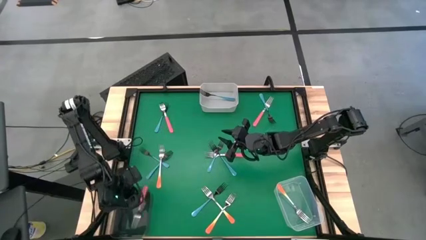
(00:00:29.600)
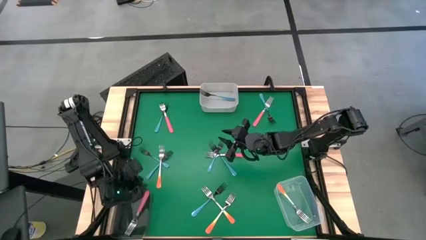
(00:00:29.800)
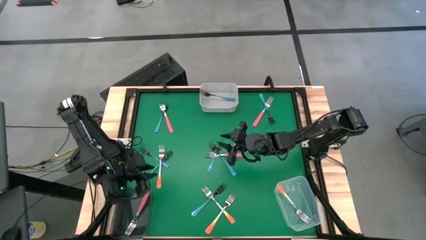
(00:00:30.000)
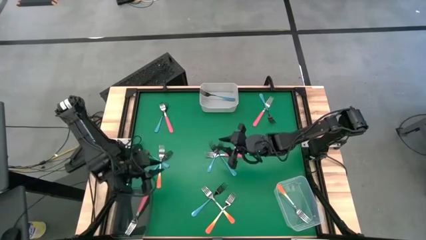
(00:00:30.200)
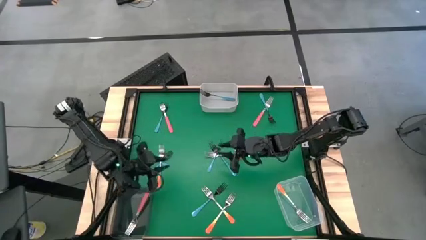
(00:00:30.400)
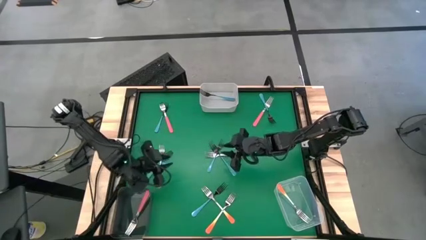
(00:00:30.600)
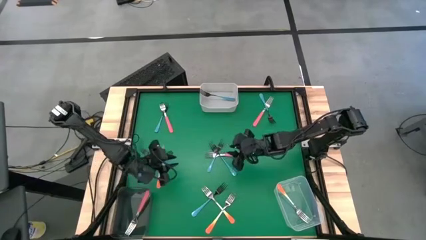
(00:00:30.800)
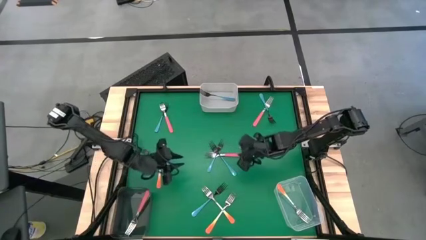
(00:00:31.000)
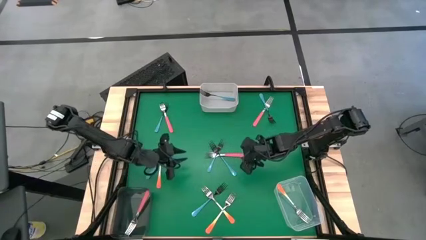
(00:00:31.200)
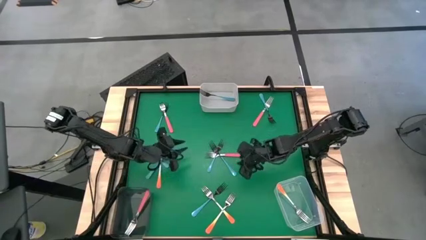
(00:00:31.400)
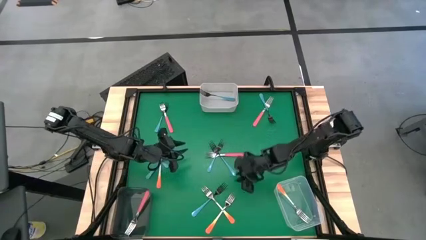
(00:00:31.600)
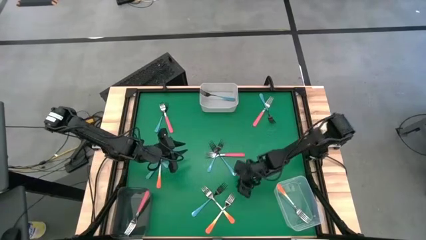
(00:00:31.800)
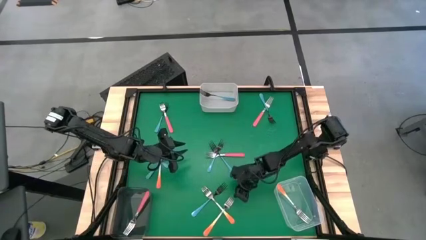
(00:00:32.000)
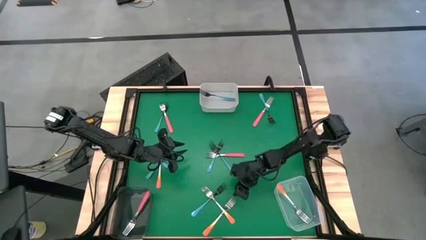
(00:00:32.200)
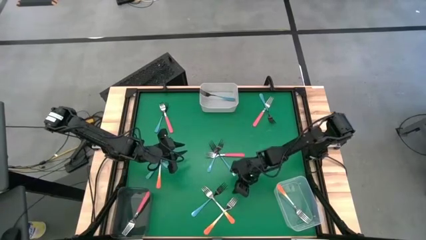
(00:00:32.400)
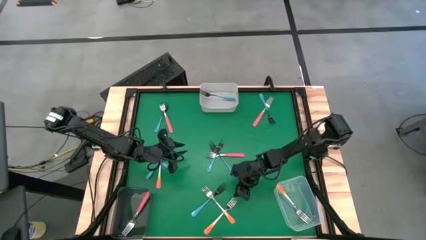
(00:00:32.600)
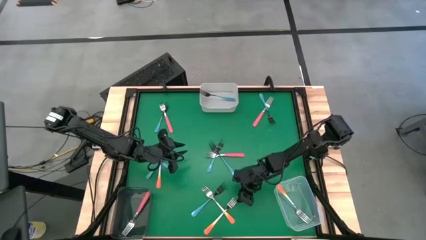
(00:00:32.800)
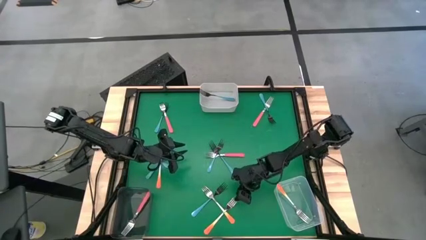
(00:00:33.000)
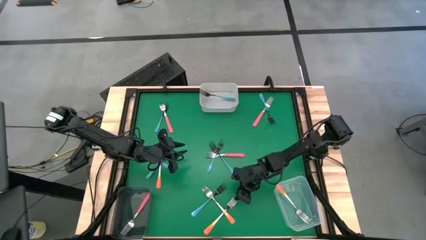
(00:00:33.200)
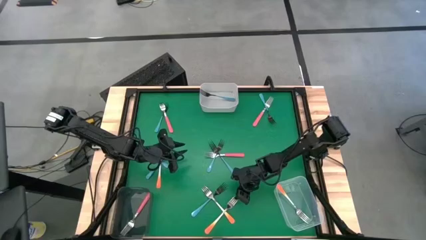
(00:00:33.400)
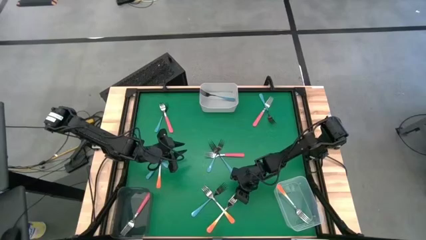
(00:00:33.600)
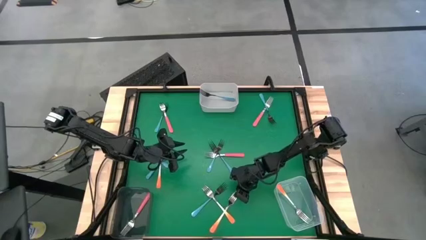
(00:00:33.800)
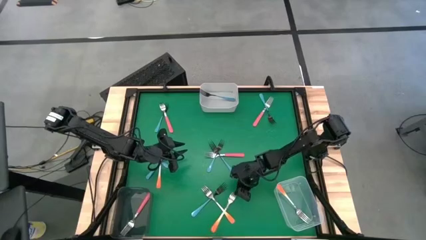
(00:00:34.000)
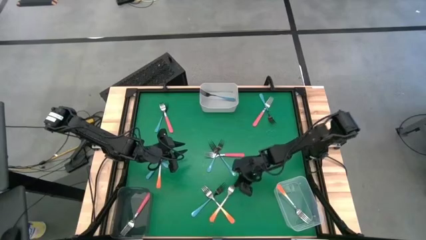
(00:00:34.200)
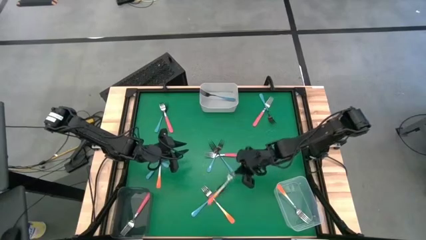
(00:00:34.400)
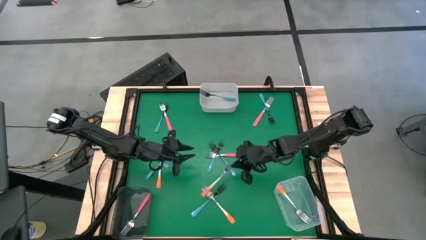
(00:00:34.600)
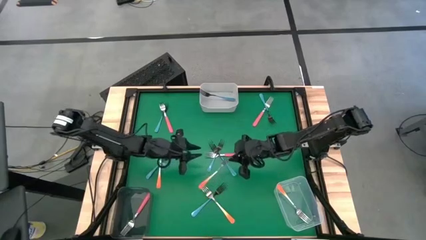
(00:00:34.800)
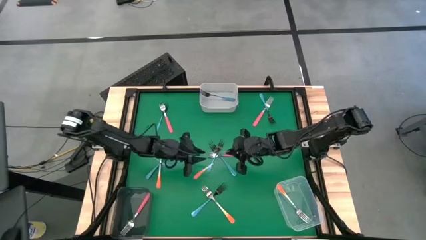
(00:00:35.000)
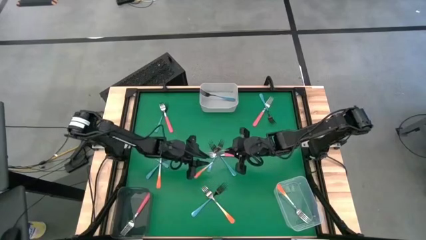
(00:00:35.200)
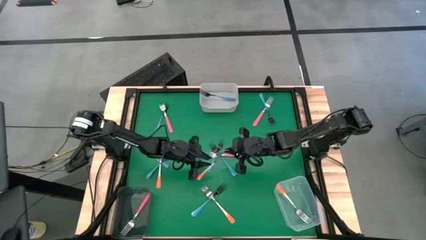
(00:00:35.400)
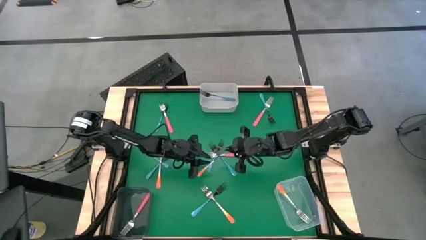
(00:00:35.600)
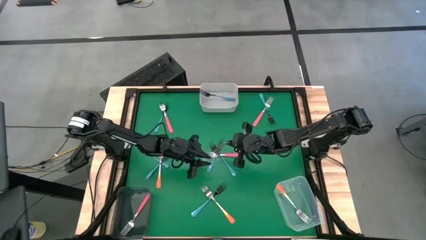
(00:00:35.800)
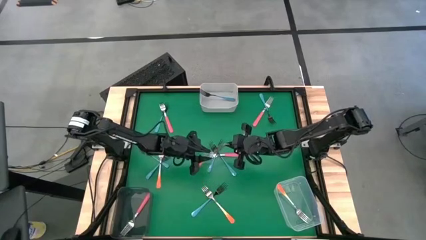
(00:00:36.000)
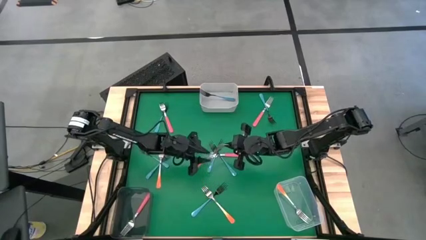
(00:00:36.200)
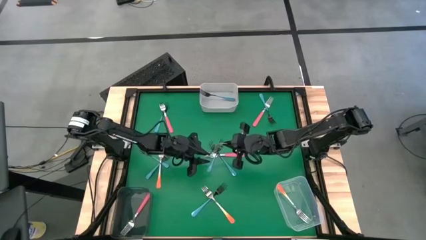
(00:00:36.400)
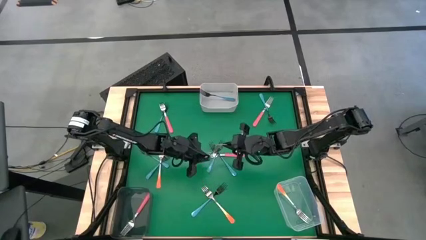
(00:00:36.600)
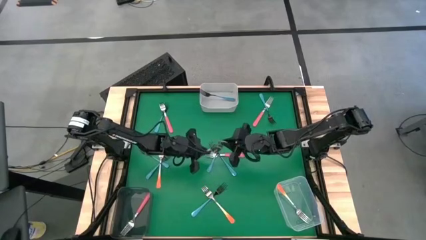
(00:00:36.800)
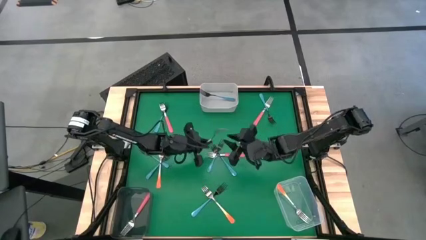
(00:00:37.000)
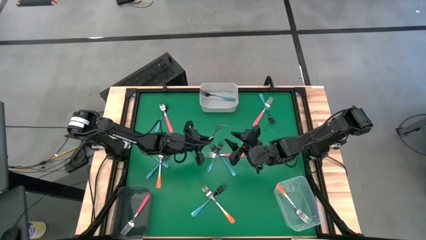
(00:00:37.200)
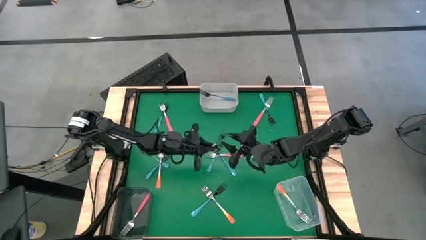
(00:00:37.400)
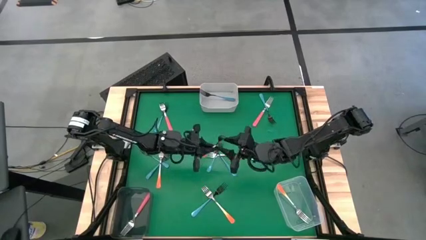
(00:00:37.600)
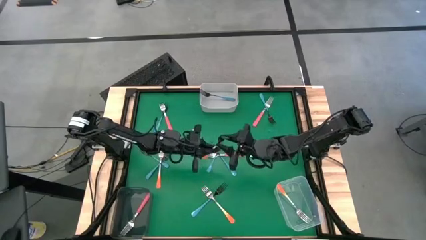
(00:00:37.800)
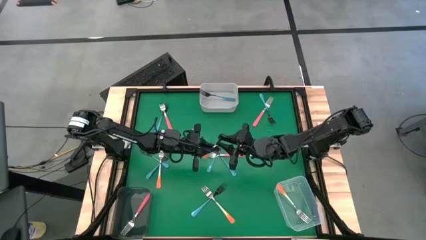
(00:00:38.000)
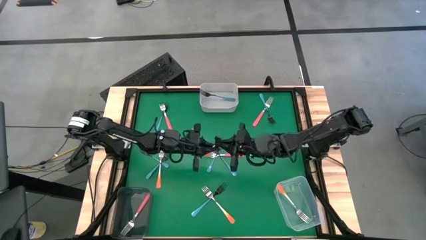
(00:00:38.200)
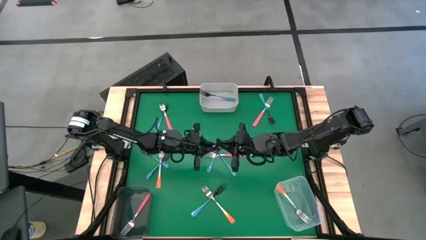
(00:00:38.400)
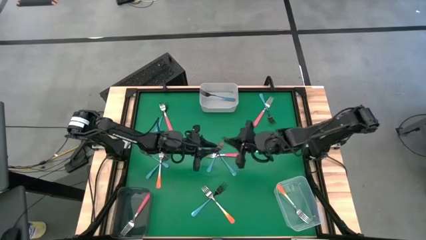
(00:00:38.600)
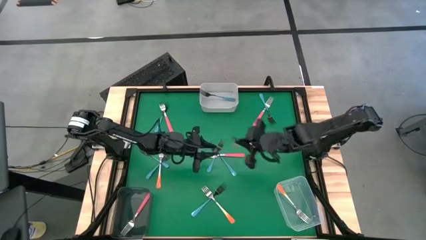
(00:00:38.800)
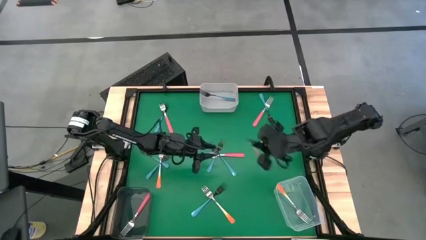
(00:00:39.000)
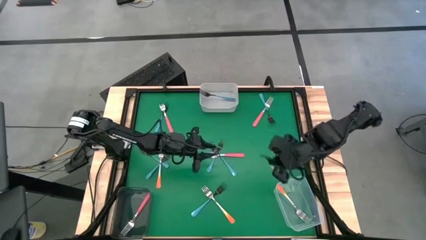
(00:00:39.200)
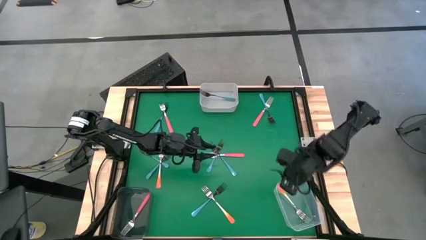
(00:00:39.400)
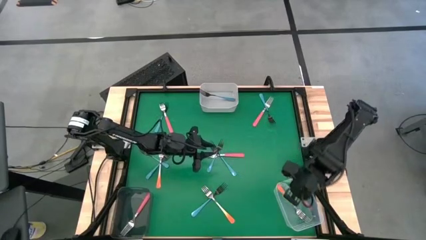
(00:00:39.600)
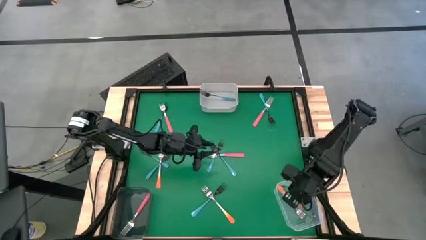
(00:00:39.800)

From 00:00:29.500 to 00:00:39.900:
Task: Sort silverware by color (type)
Put the bottom orange fork into the transparent bin

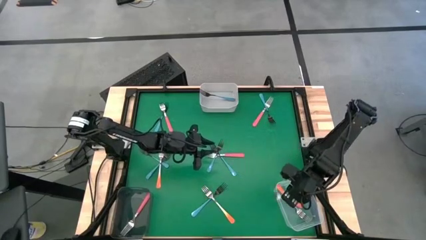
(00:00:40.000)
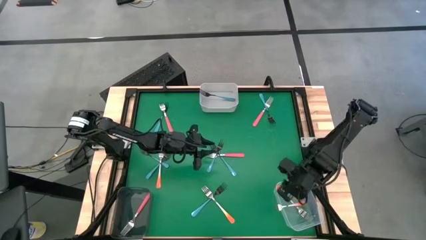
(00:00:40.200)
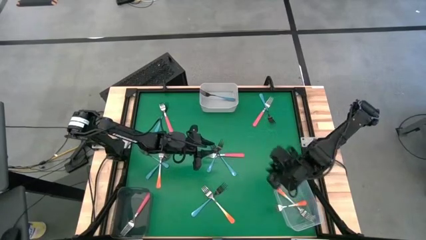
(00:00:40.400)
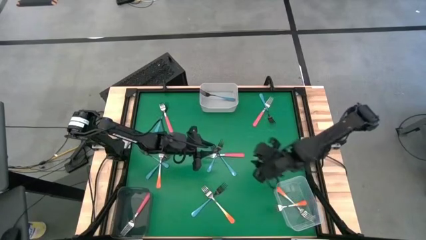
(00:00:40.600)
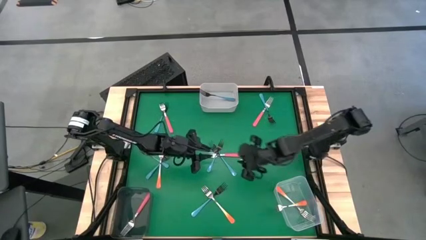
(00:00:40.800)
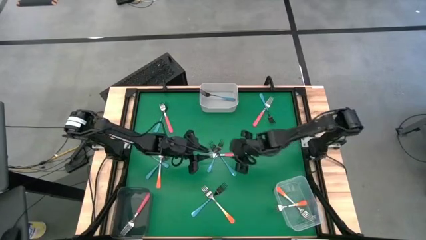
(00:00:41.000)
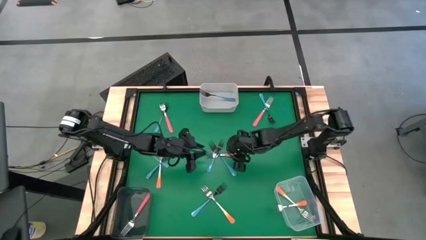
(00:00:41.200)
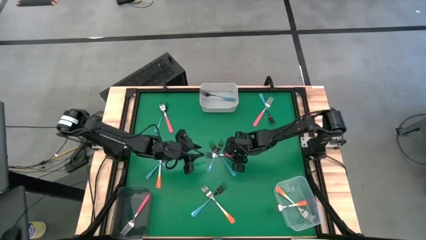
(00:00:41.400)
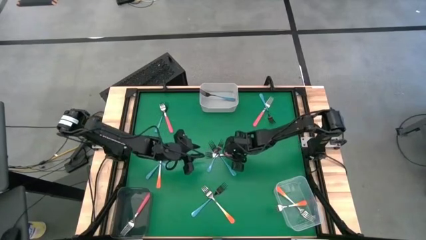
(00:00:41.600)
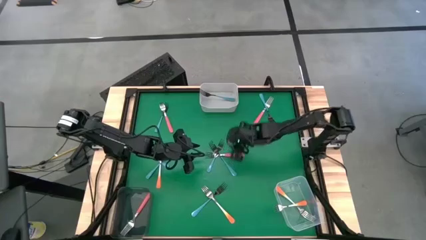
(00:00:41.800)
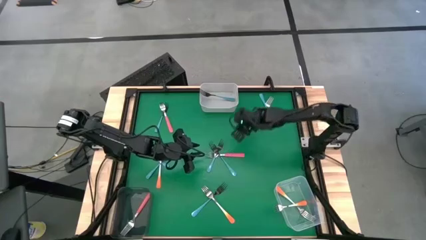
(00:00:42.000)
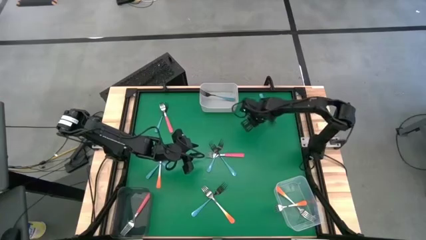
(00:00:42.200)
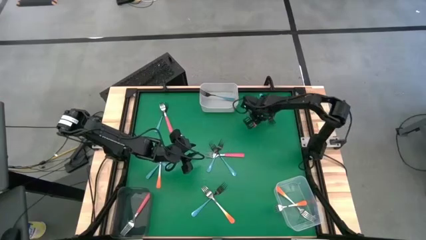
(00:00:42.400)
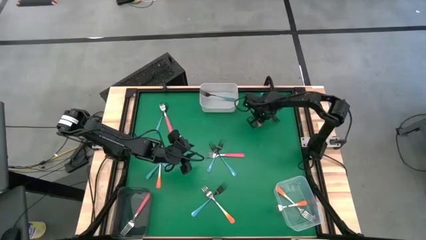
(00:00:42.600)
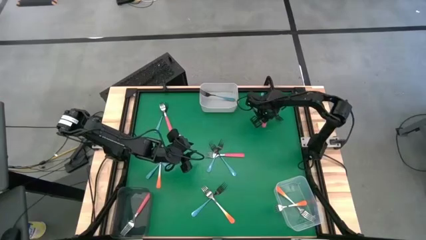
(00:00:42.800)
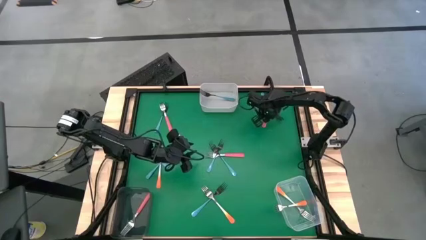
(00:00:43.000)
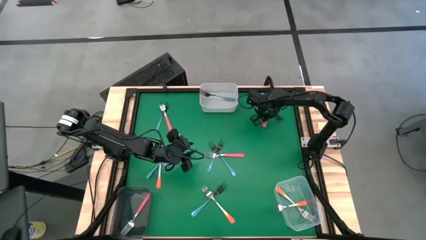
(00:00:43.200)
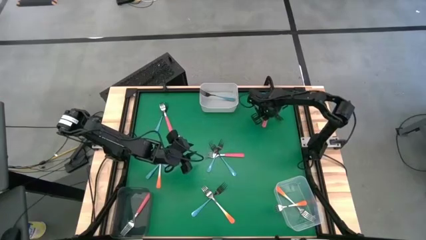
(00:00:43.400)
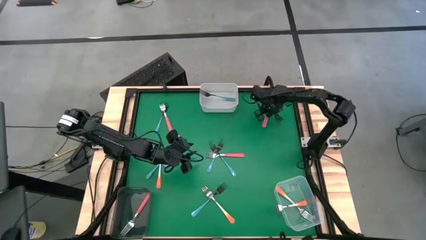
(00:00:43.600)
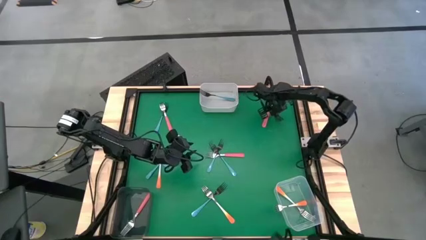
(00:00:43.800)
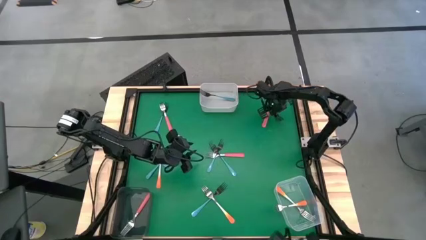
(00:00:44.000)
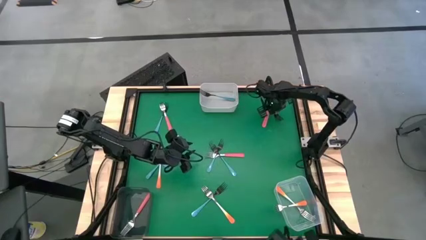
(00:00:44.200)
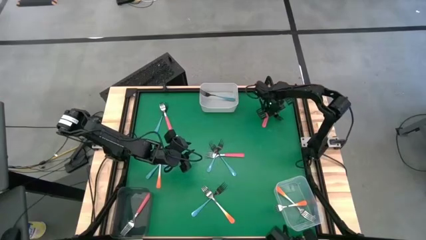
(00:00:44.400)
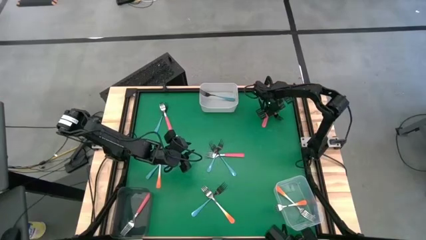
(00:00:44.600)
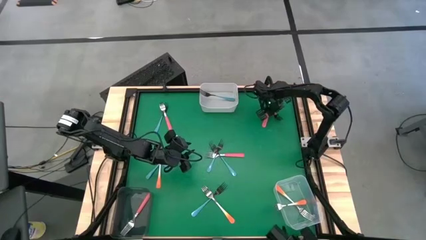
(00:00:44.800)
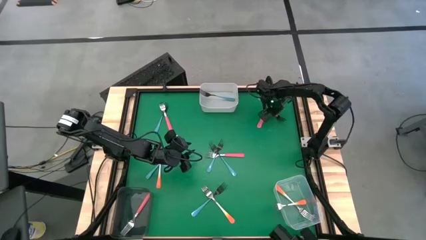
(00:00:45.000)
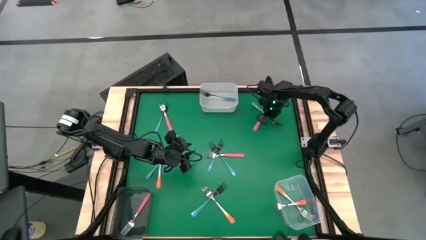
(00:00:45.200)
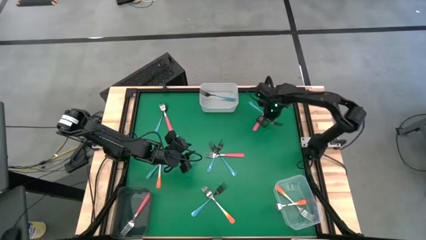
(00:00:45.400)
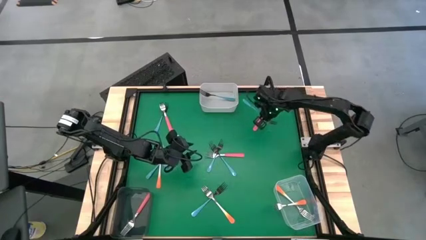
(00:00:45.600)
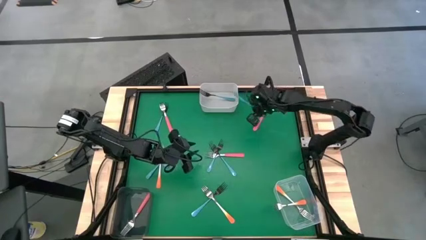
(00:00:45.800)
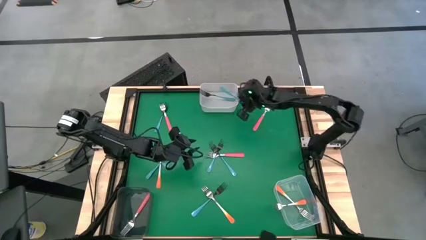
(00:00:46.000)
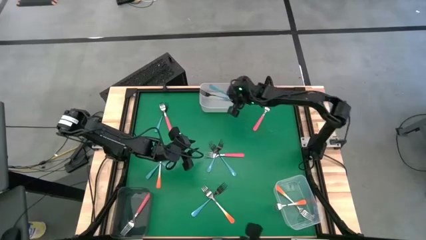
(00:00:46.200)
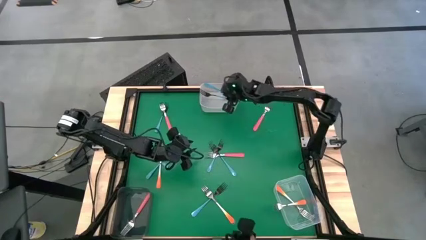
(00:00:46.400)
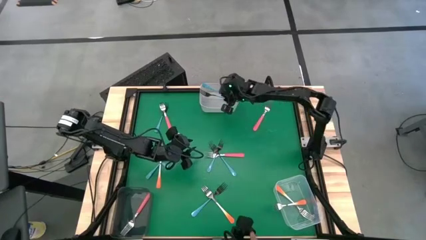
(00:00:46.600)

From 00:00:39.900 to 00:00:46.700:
Put the blue fork into the white bin

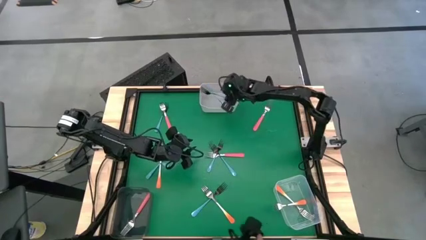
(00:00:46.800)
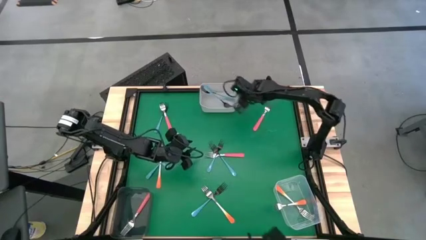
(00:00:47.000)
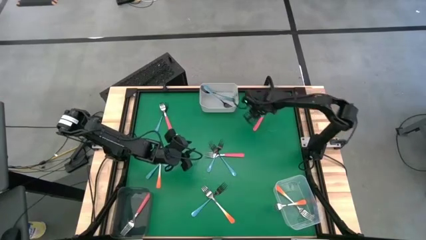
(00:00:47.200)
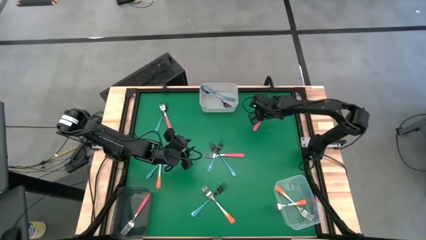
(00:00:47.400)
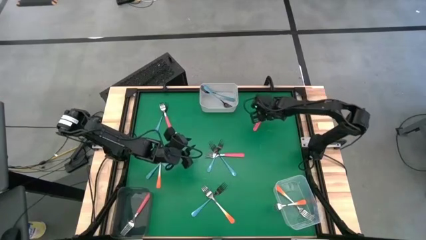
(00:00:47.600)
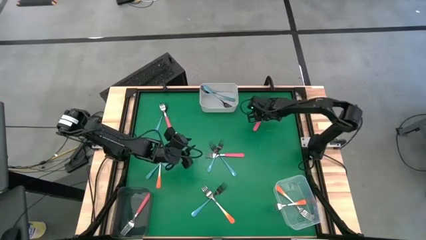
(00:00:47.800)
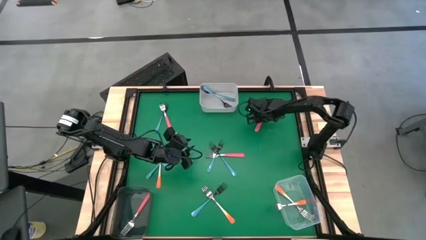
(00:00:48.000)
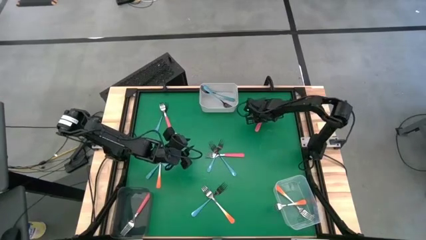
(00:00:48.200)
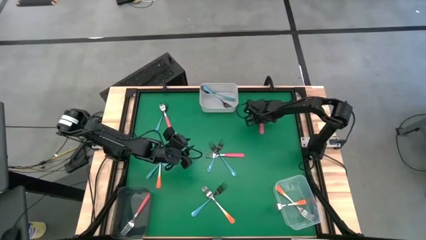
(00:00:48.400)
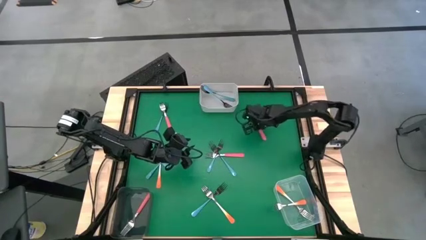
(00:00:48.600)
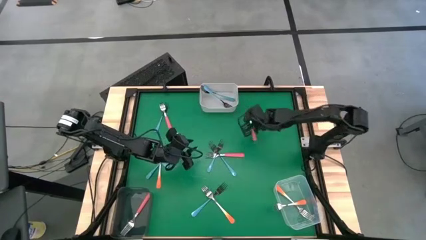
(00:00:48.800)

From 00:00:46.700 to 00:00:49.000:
Put the right pink fork into the black bin
